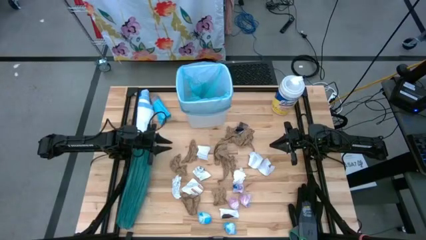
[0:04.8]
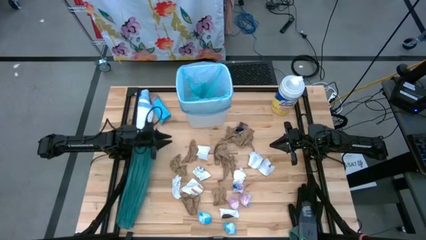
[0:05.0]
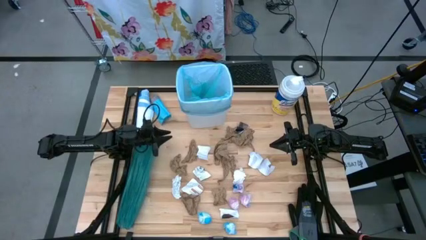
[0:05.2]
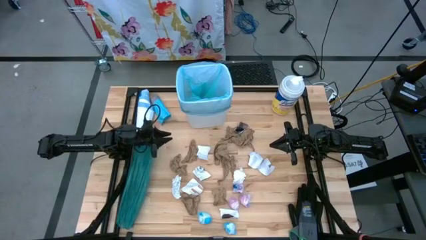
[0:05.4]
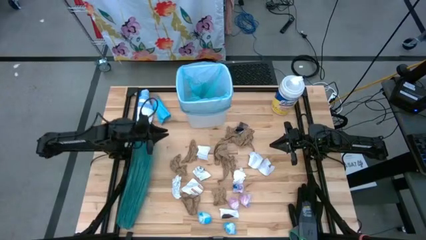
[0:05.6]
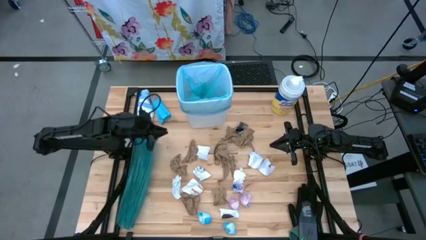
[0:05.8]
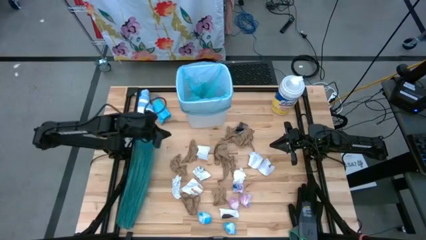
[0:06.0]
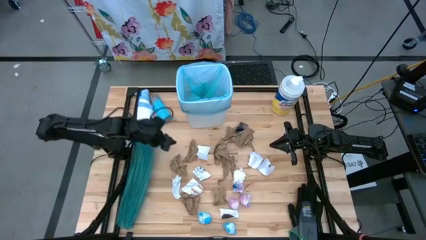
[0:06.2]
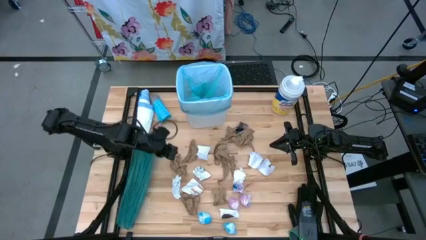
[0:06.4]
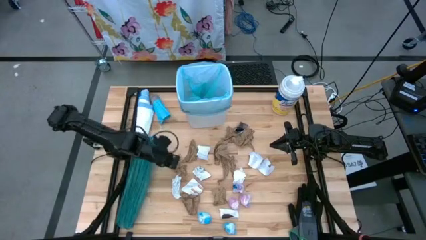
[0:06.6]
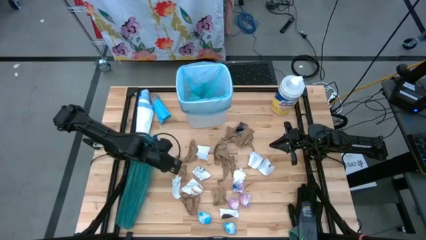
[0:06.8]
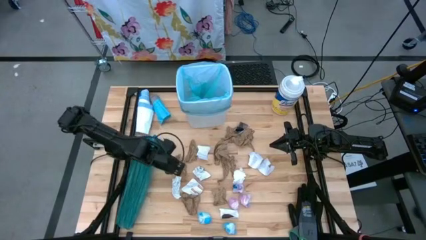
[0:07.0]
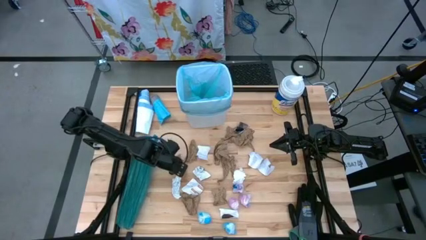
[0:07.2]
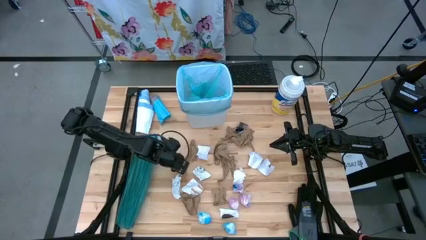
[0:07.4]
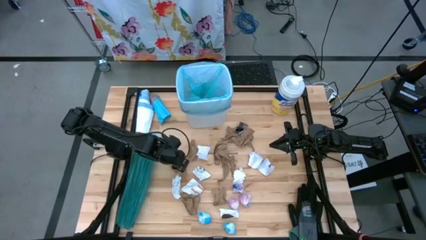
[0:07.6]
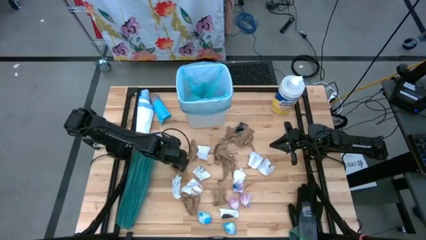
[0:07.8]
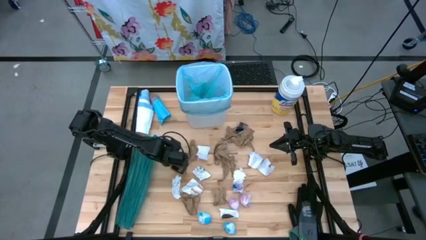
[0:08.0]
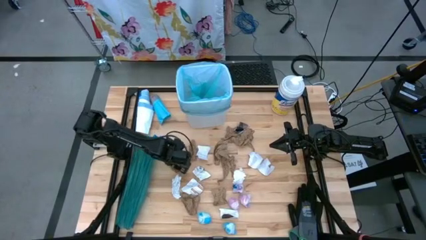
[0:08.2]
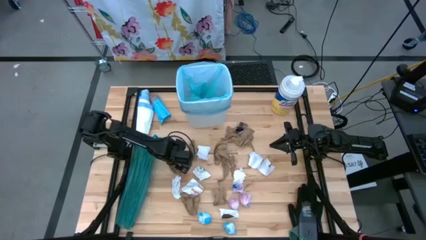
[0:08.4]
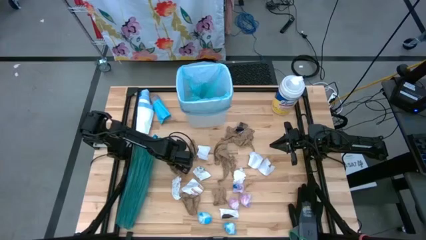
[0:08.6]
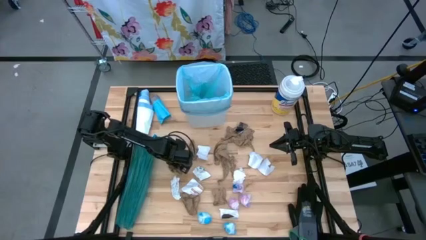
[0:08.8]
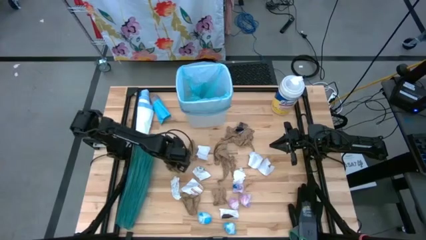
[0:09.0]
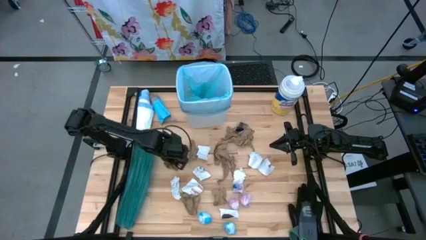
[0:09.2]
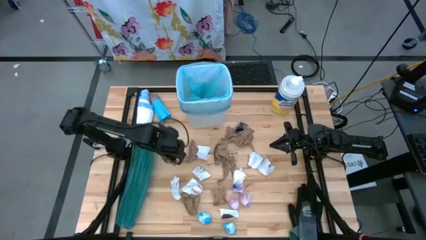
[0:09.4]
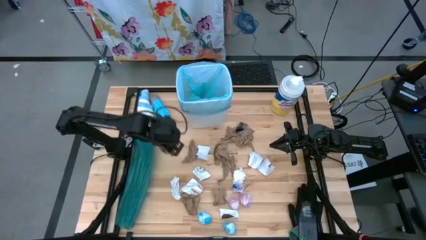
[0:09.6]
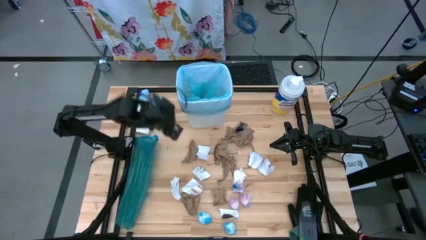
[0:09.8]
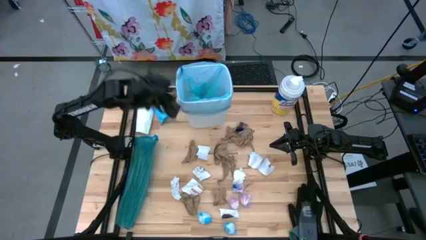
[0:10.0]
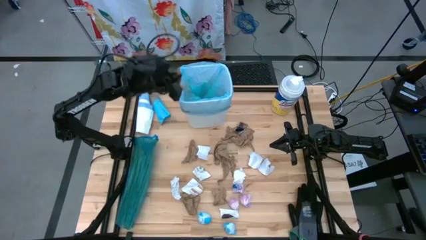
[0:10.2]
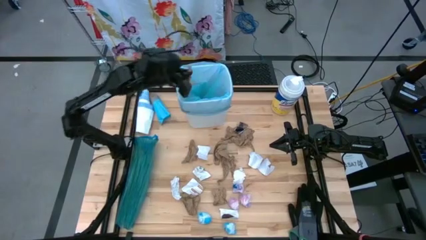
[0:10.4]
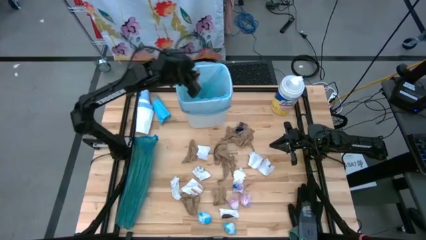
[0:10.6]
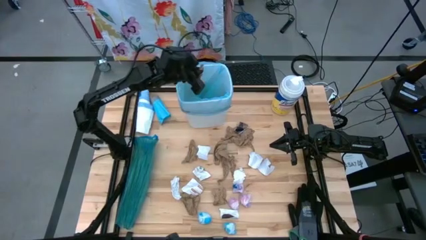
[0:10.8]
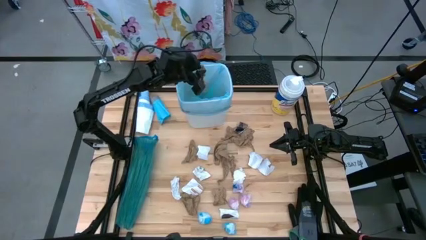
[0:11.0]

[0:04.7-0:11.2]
Task: place trash/remove bag and relplace
Put the brown napkin into the white trash bin

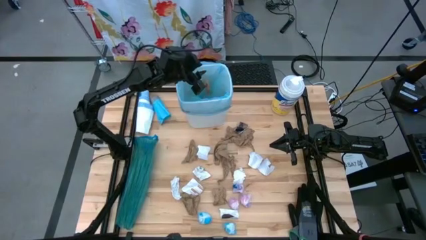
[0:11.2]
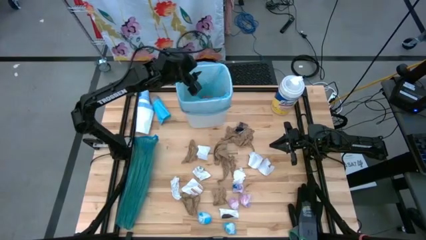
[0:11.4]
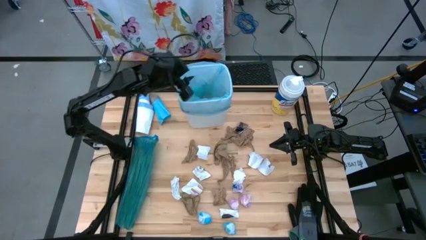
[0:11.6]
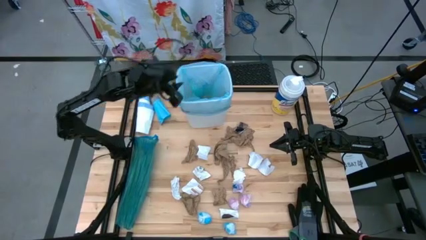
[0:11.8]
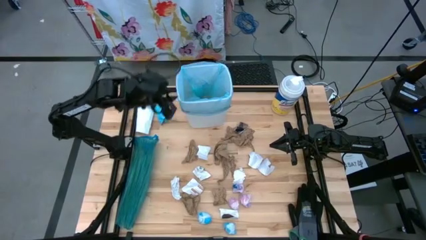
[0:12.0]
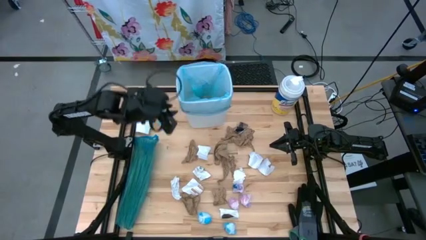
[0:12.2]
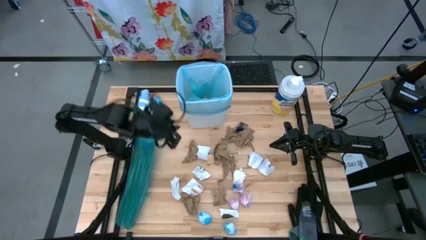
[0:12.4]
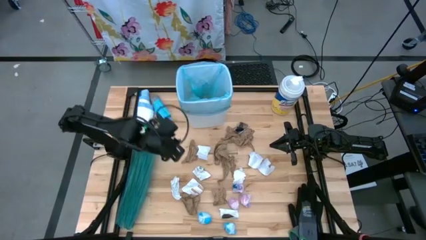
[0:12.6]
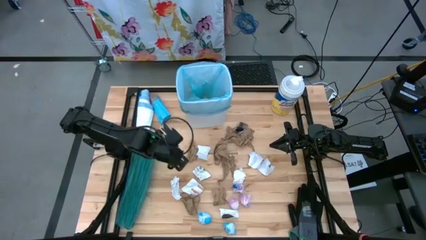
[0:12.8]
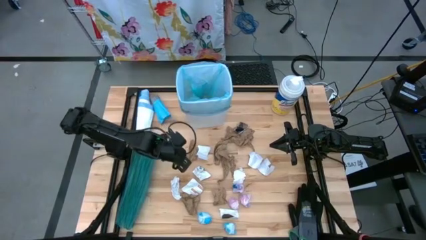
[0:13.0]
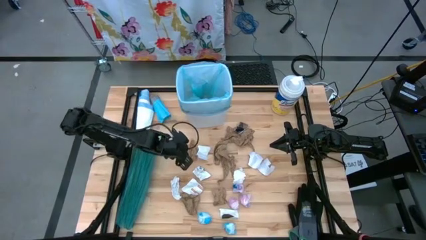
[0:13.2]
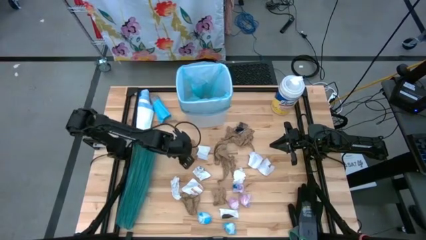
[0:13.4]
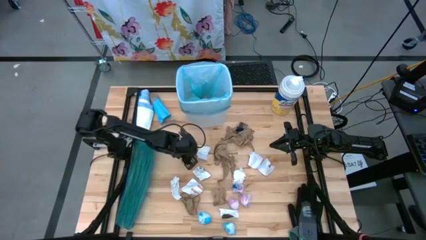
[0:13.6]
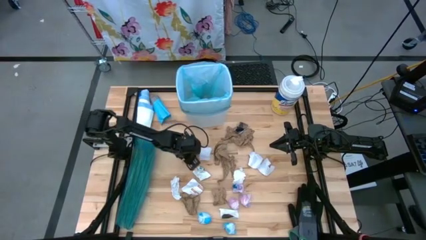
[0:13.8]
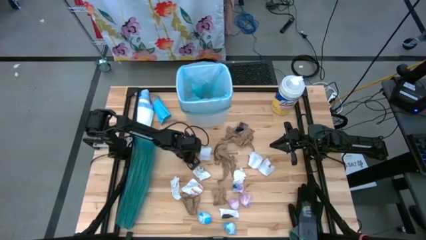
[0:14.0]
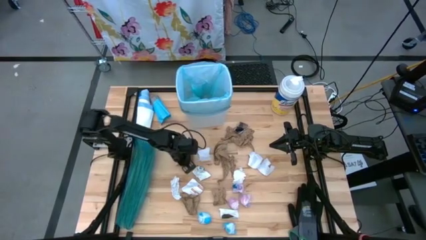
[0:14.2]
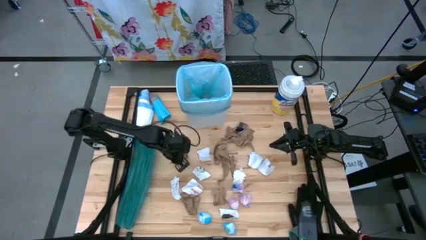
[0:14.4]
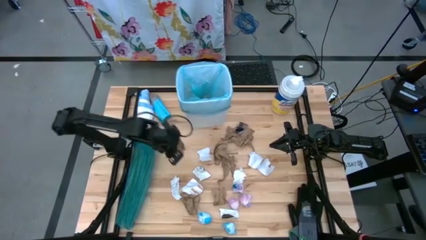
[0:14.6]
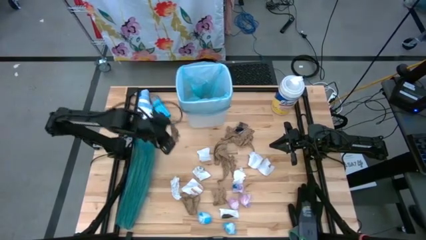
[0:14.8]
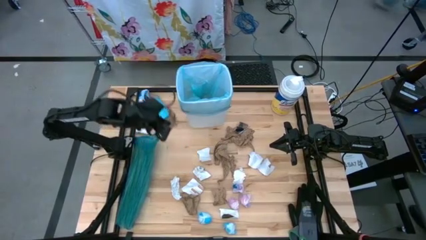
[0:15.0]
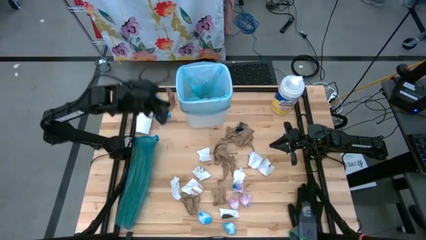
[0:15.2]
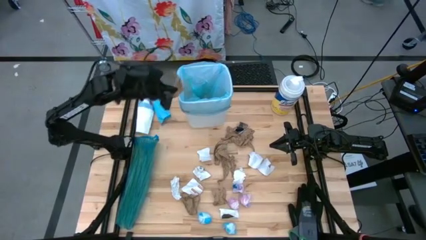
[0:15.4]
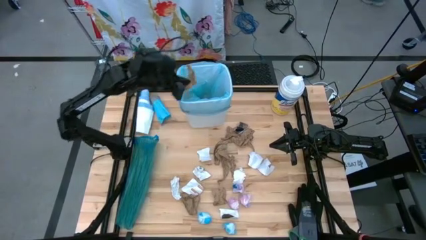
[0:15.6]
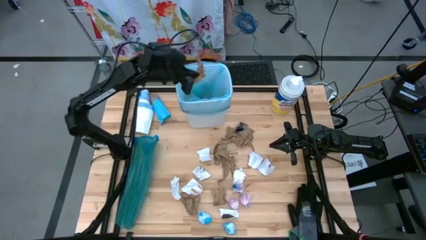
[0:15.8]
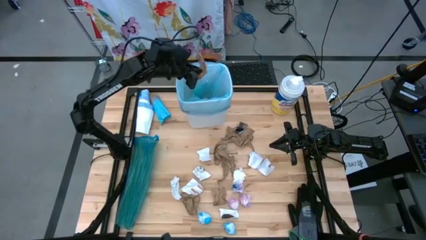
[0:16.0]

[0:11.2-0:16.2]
Put the brown napkin into the white trash bin

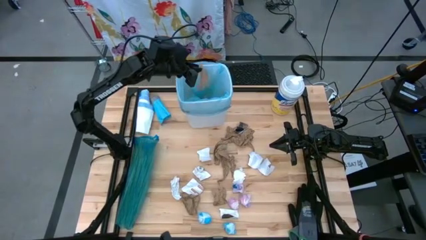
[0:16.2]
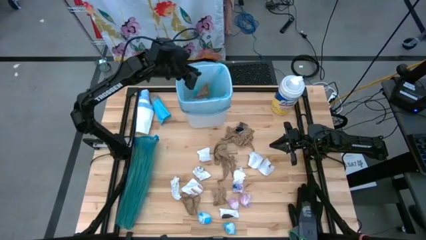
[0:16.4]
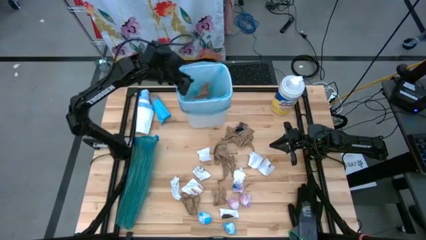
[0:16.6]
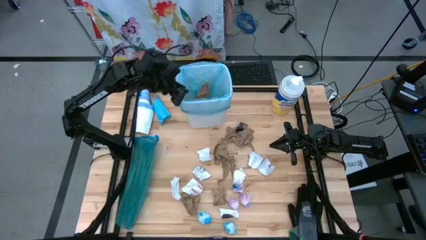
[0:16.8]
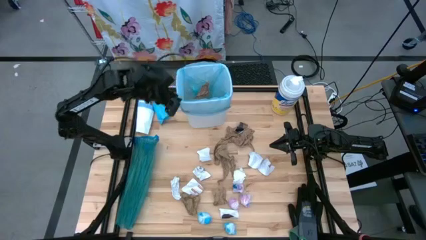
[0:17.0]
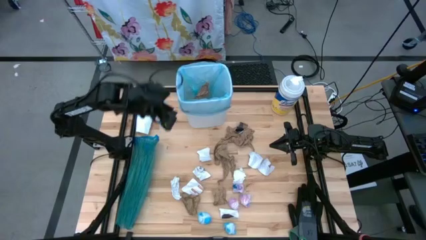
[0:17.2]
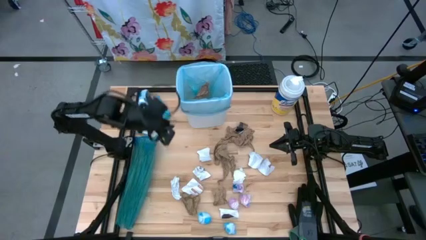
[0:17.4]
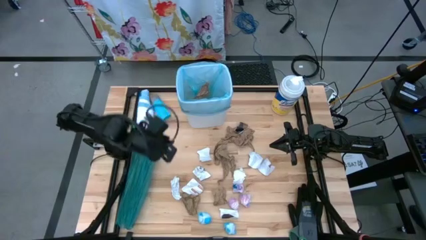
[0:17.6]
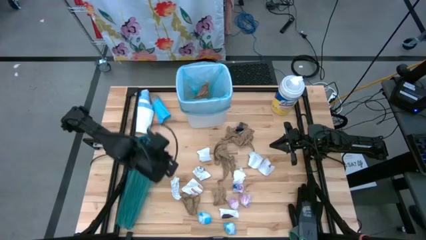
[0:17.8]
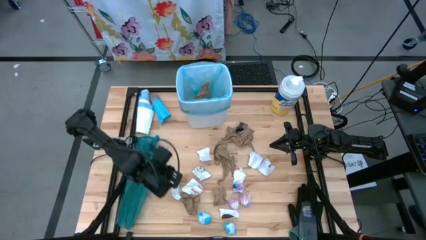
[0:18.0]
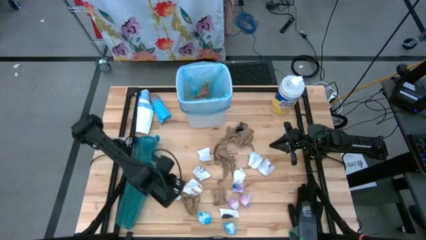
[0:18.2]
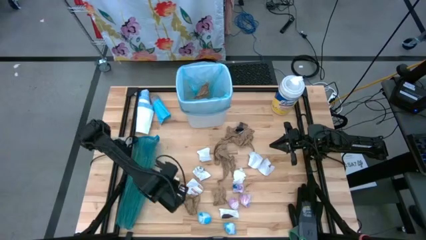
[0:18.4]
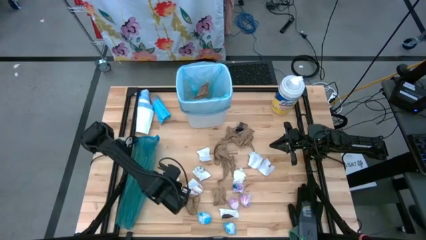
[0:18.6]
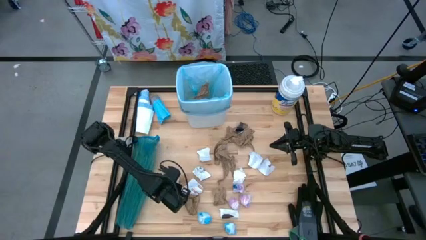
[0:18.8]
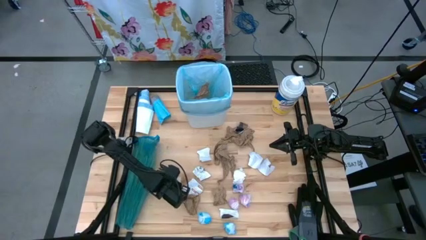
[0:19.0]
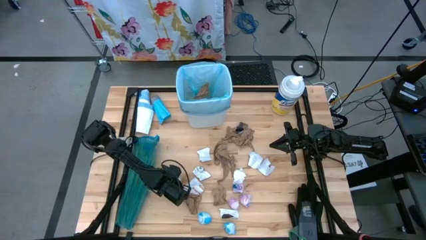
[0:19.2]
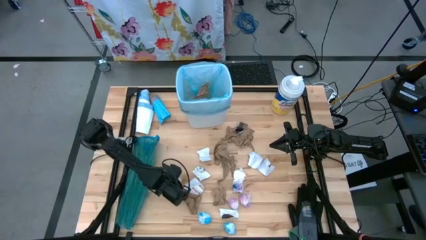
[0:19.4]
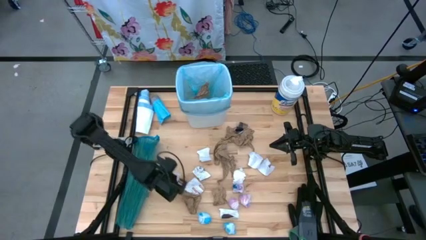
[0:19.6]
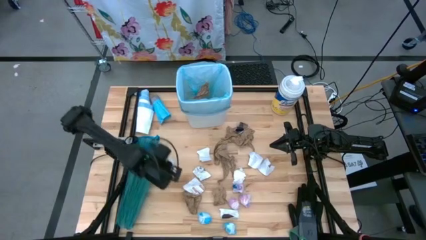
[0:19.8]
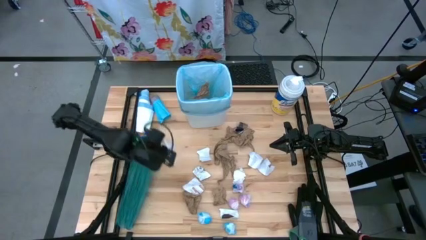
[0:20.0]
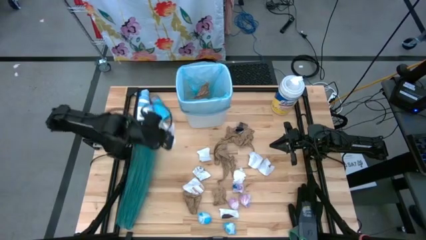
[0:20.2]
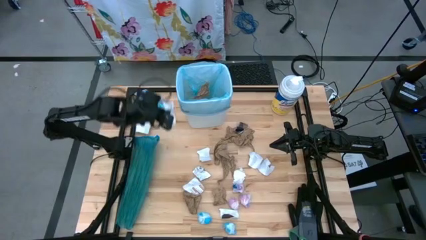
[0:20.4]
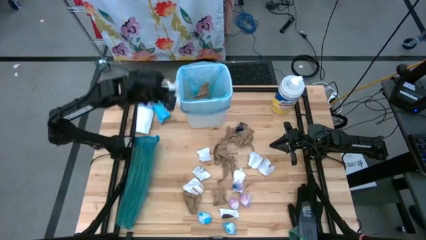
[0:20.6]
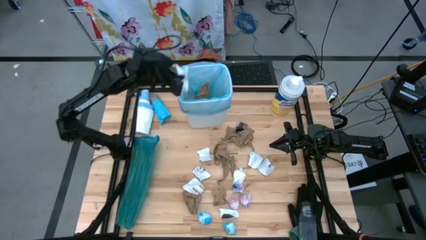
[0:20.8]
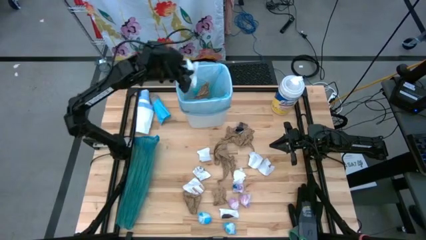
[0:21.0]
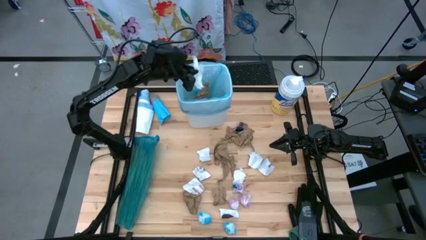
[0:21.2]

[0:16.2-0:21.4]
Put the white paper into the white trash bin
